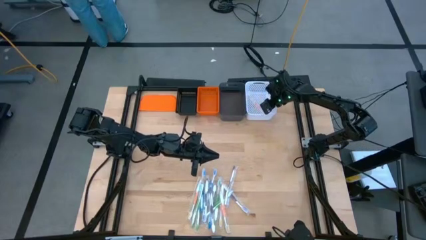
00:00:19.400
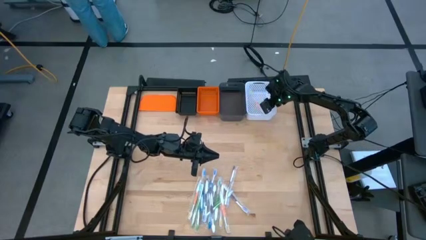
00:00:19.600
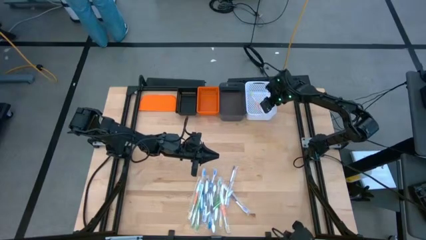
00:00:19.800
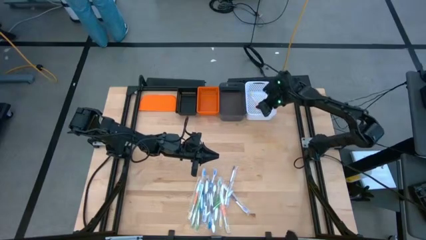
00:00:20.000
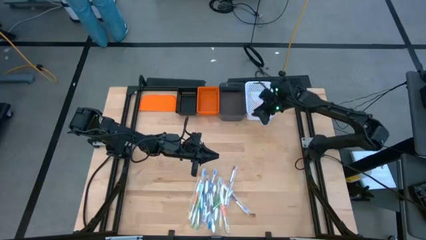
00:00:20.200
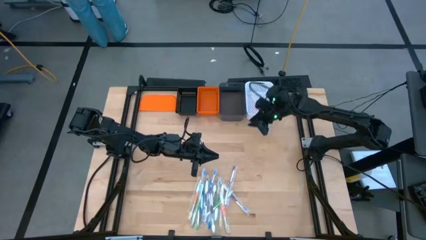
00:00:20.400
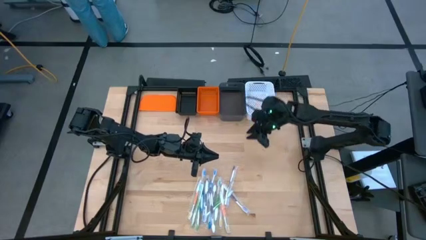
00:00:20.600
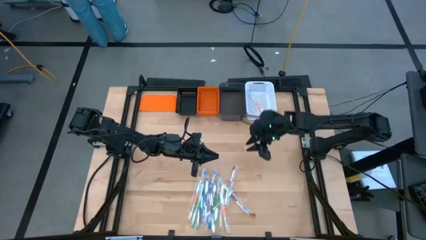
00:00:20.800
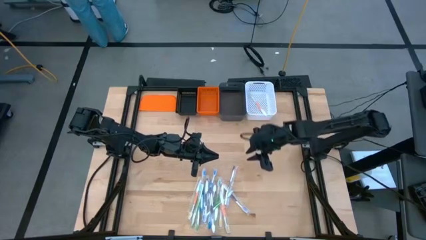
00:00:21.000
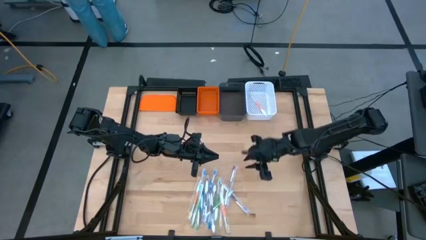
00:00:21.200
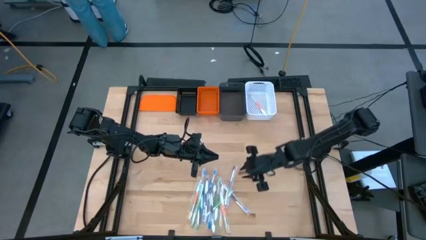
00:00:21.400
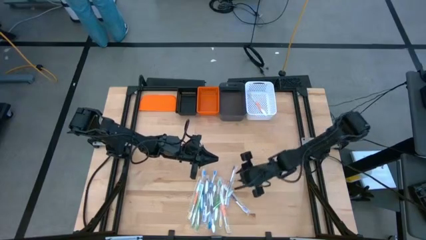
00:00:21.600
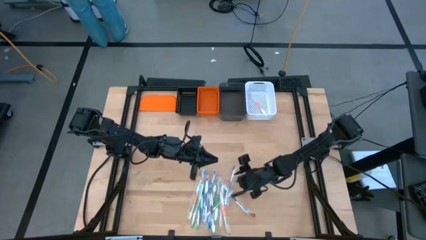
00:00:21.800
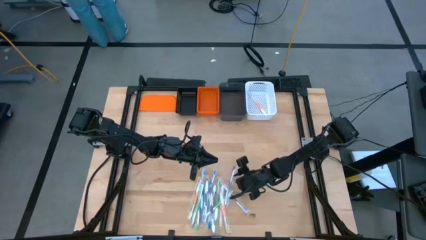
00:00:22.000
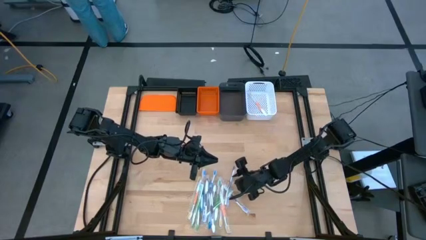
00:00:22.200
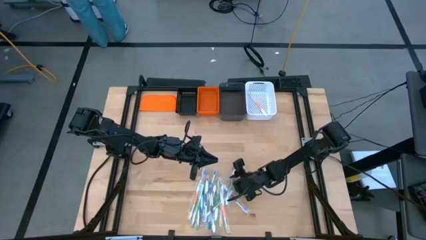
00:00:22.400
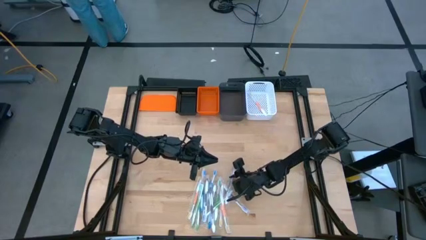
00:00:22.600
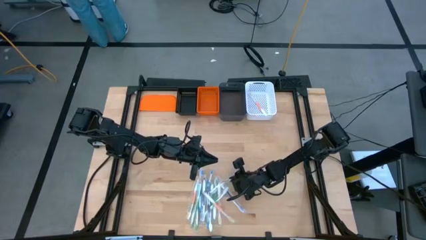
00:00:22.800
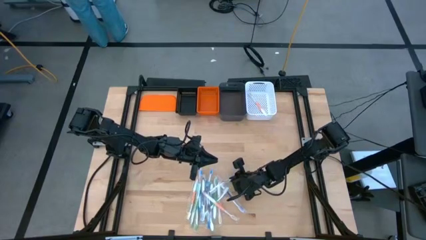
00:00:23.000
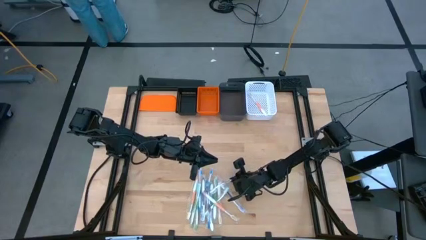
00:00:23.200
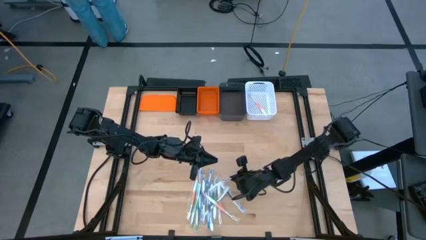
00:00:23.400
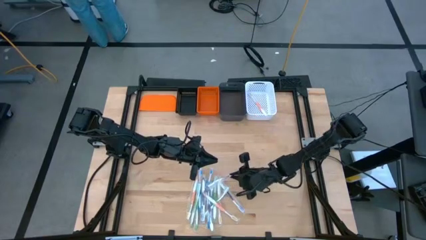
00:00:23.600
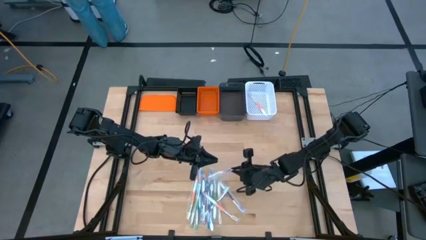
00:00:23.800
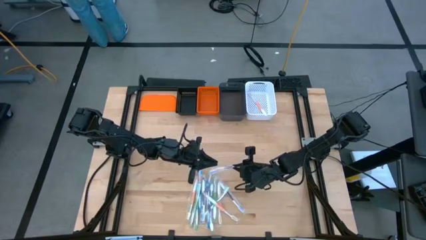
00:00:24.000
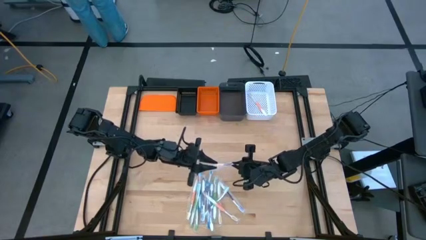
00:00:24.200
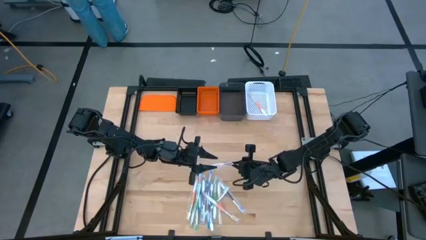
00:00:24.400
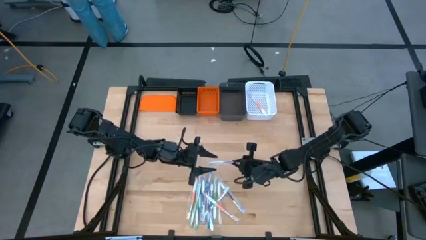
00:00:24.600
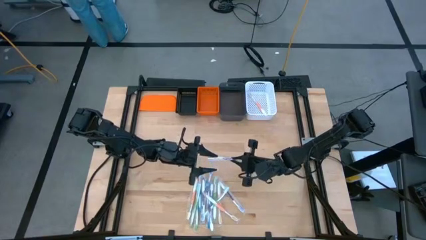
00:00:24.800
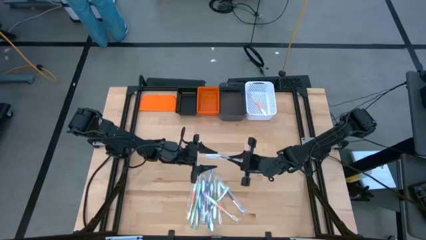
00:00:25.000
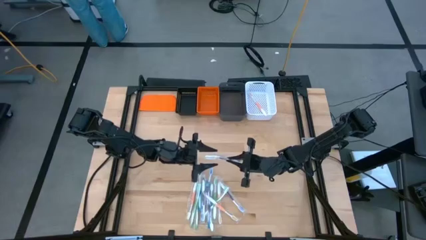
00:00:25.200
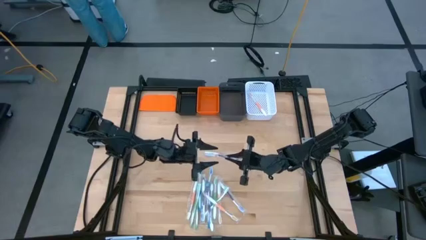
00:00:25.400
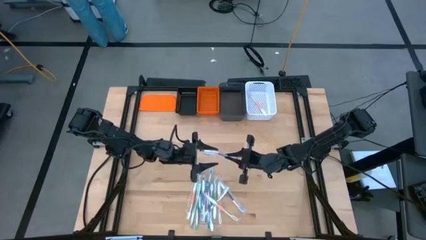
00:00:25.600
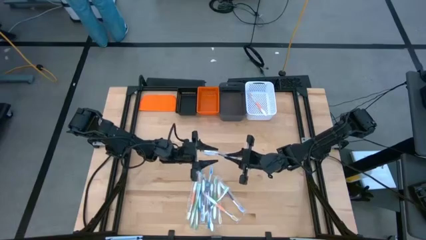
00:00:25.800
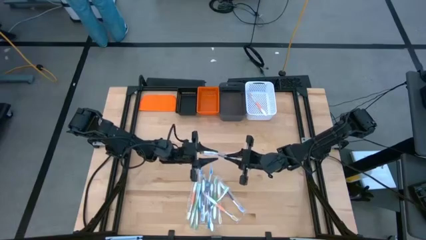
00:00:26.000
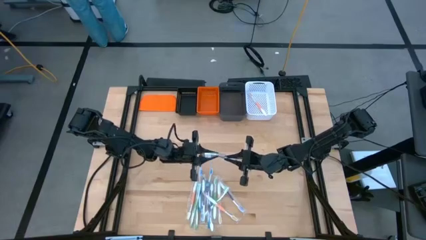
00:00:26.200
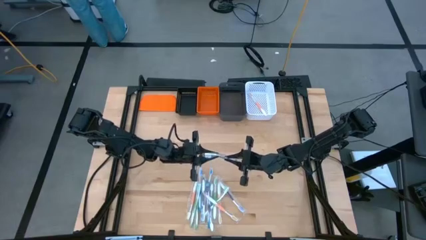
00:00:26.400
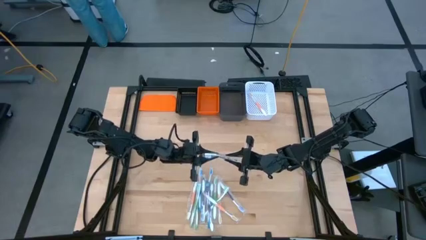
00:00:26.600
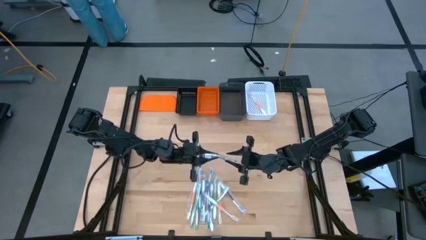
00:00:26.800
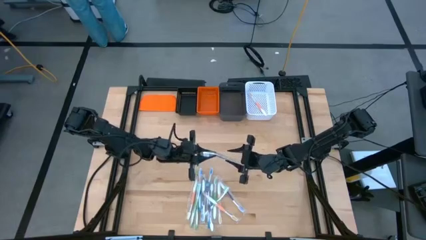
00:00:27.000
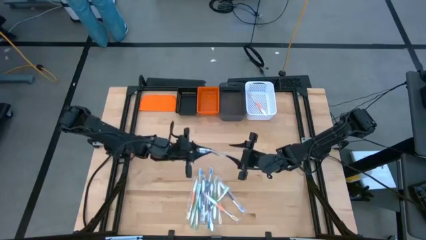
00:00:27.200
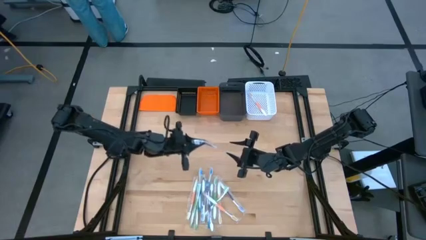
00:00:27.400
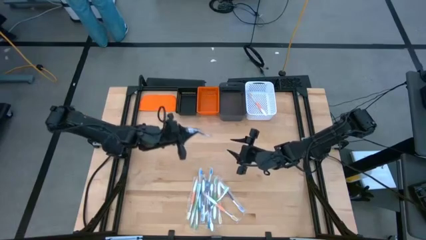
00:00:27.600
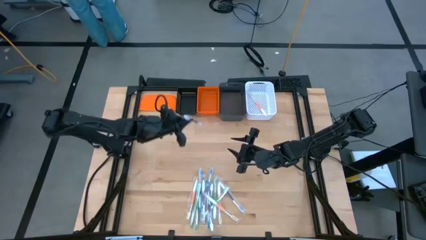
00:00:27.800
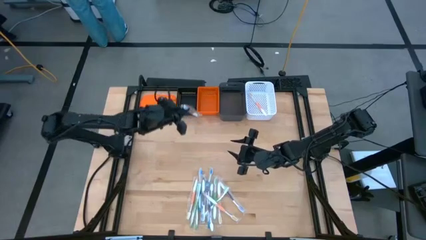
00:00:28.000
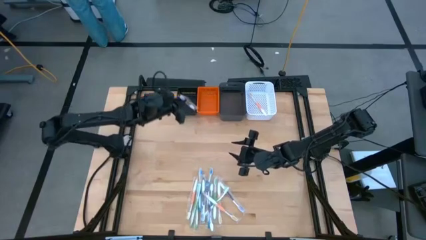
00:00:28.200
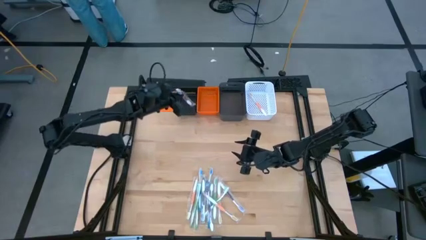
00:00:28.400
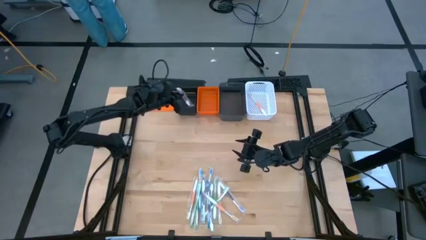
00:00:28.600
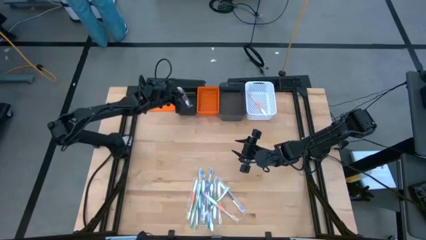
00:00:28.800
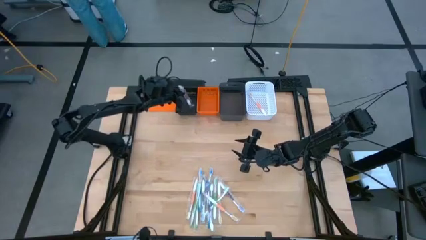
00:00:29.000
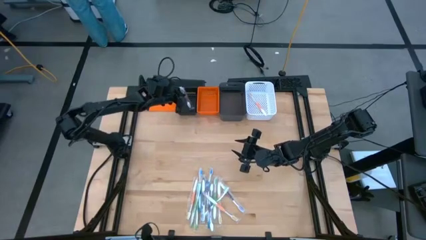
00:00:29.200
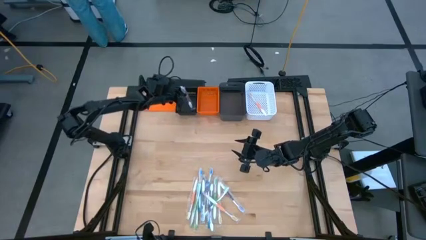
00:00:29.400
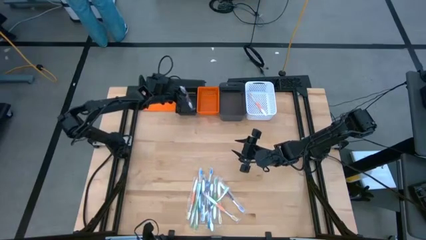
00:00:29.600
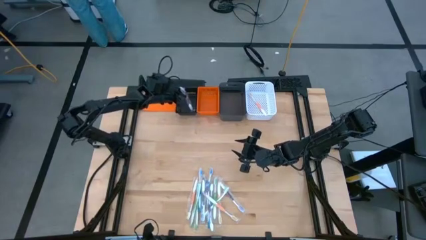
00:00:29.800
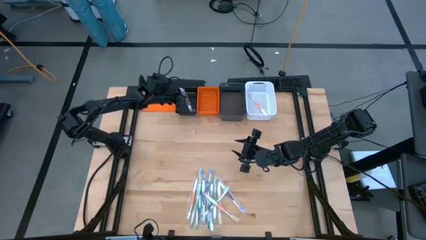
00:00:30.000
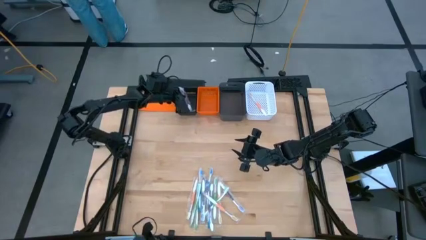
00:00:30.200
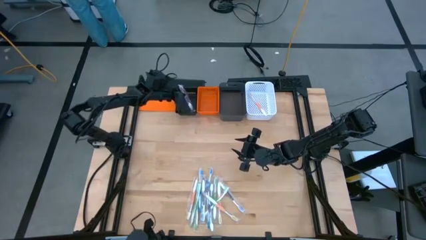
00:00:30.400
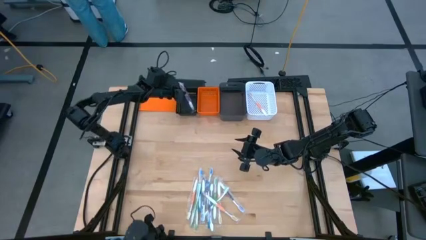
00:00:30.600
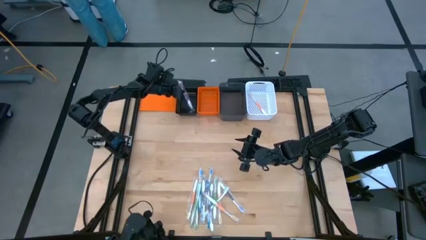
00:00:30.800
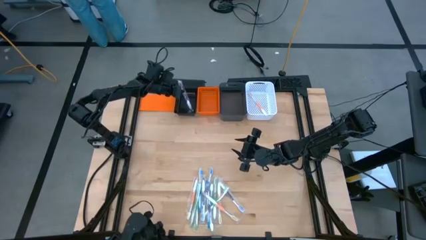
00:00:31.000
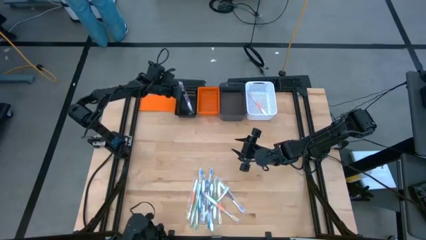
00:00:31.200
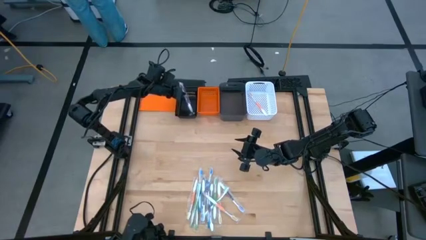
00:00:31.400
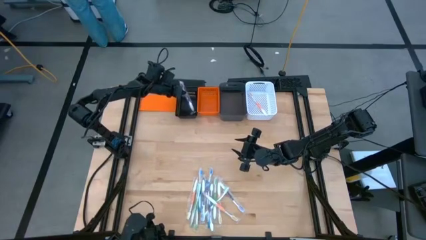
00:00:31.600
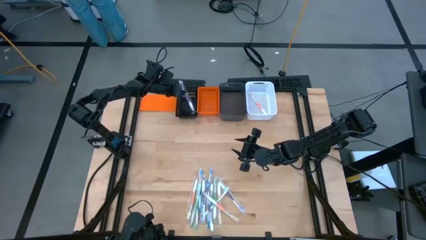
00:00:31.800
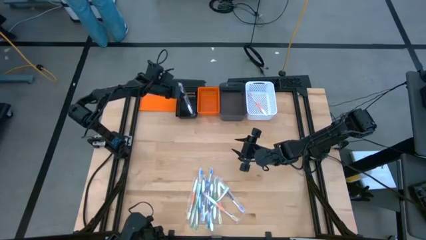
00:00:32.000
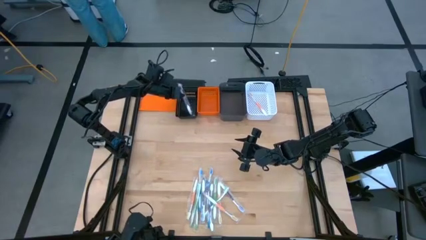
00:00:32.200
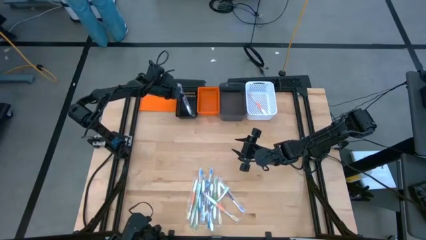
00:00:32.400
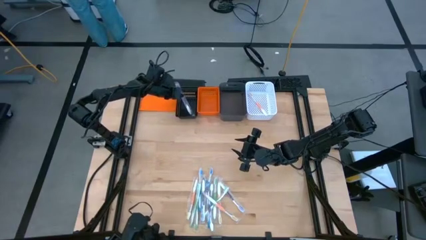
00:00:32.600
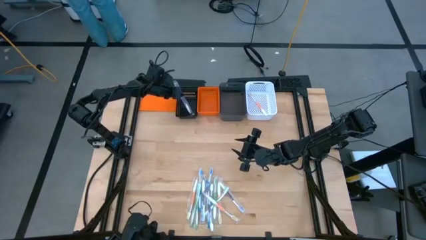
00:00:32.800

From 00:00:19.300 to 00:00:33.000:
Task: Pick & Place Toothbrushes
Put the violet toothbrush into the black basket

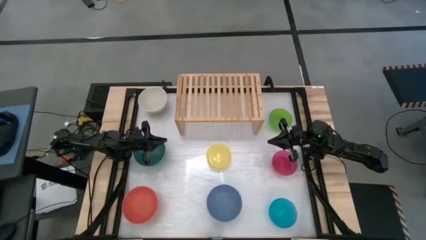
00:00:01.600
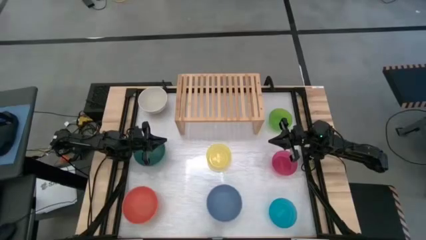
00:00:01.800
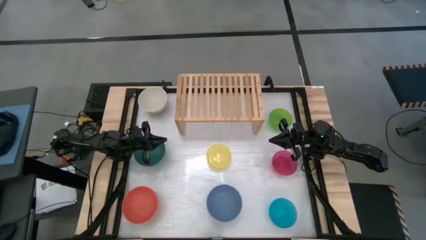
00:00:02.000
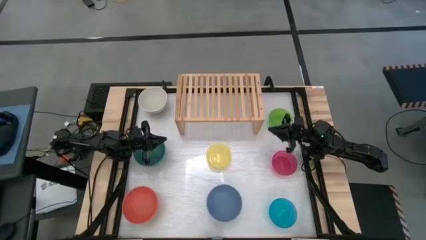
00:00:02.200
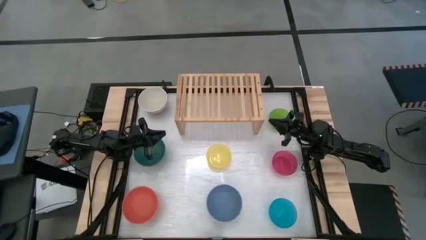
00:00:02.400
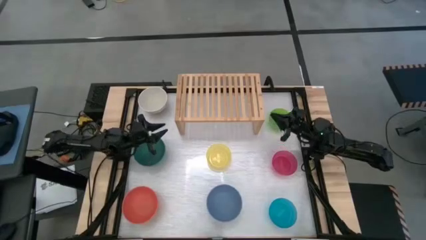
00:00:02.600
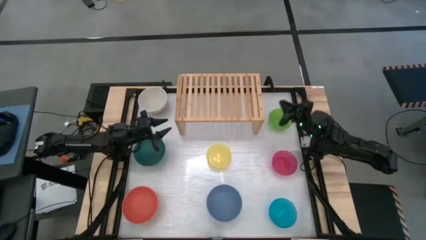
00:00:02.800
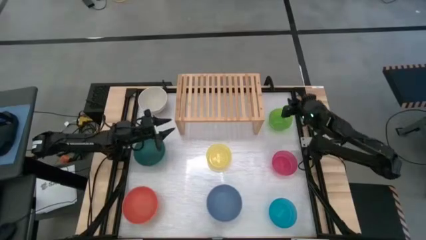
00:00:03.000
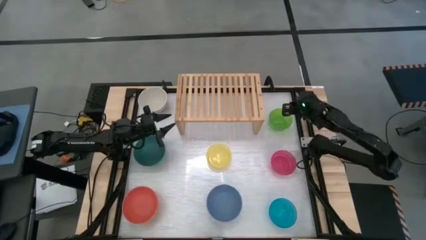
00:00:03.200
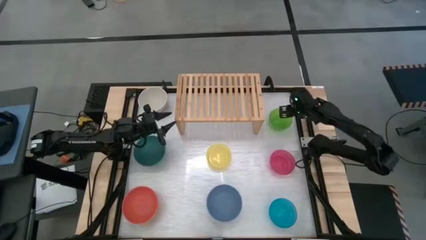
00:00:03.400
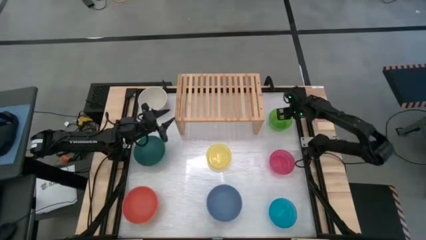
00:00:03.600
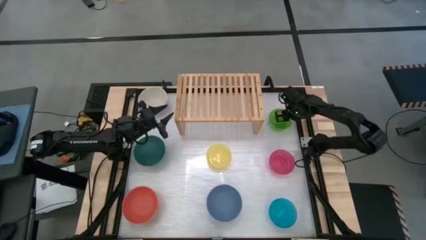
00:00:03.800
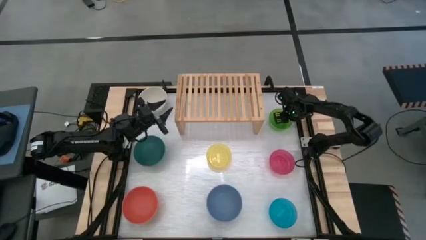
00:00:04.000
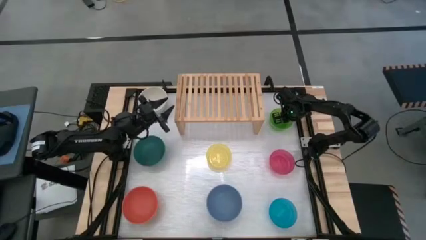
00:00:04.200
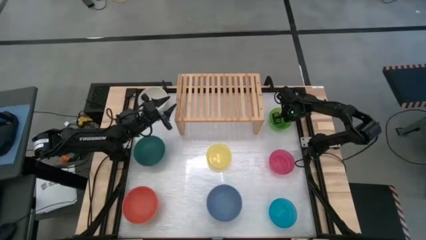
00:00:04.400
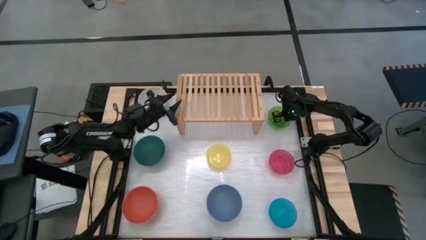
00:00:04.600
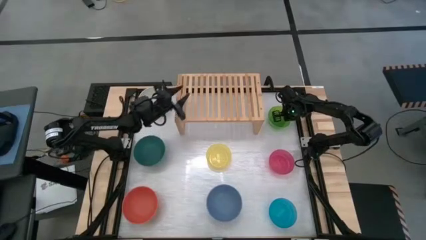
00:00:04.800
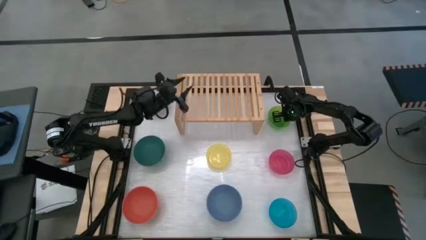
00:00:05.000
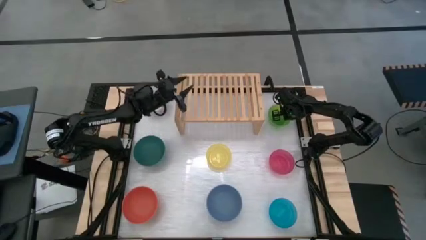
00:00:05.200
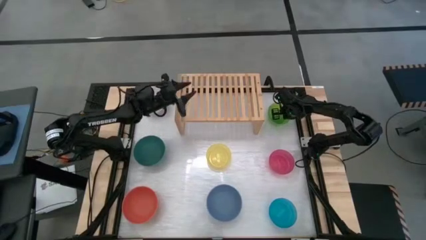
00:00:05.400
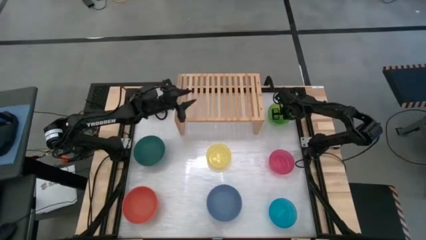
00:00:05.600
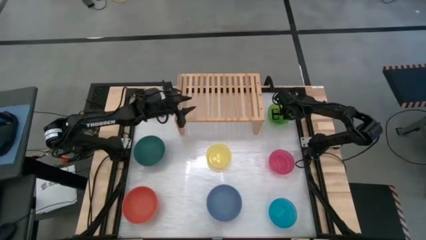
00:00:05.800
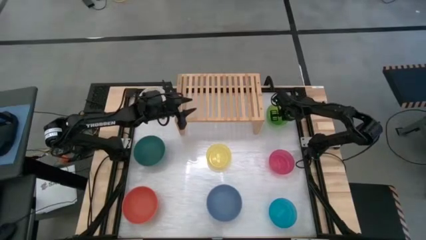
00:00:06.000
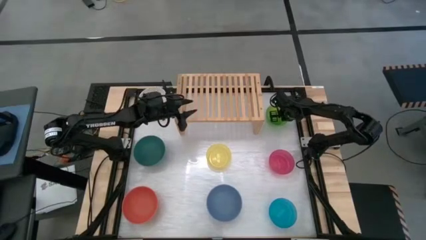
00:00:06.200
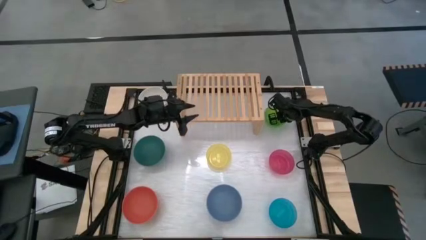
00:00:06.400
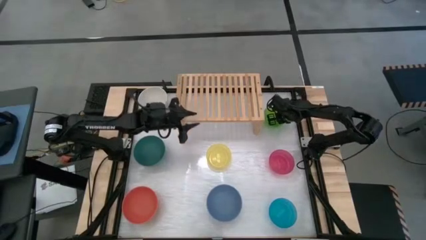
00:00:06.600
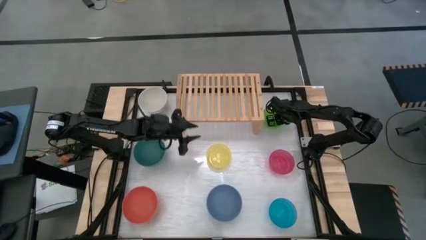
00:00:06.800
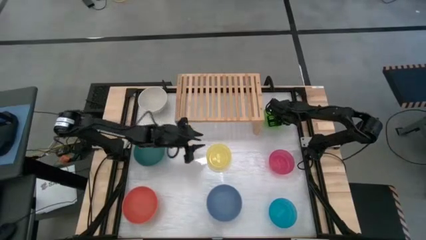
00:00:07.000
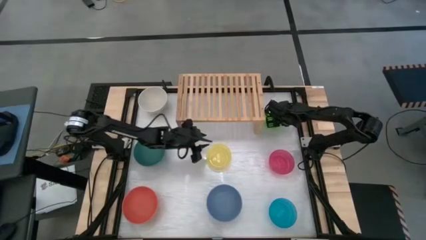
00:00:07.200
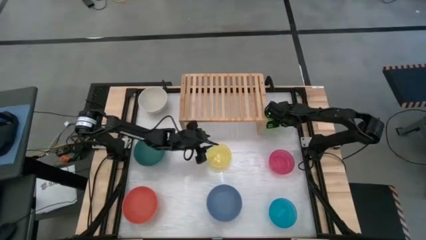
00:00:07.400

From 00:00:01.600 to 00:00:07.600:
Task: Place and stack bowls onto a shelf
Put the small light green bowl on the shelf
